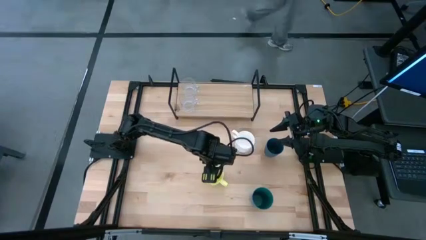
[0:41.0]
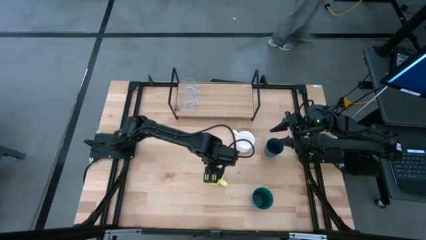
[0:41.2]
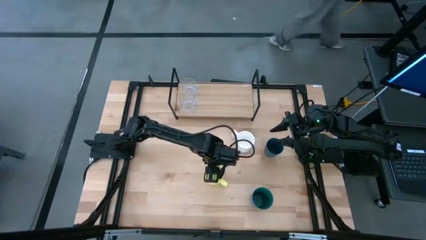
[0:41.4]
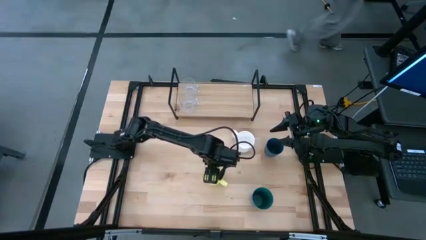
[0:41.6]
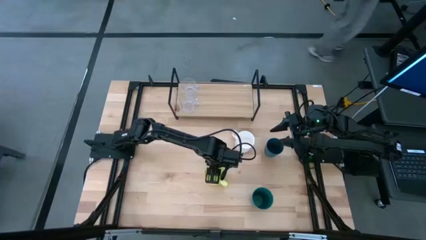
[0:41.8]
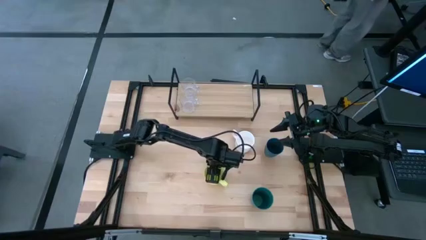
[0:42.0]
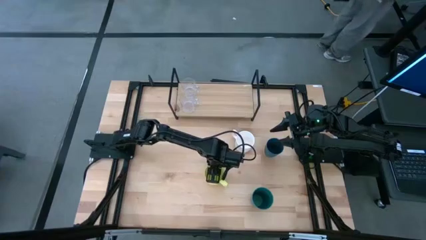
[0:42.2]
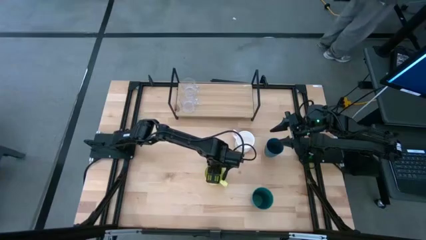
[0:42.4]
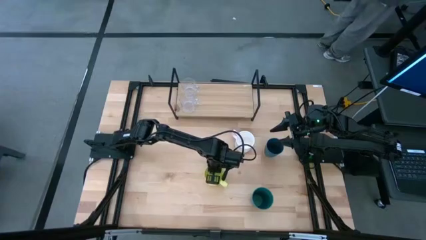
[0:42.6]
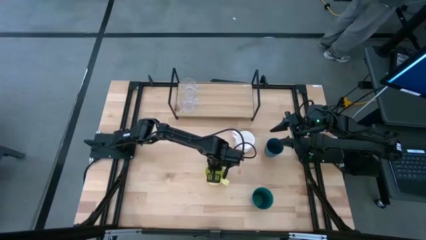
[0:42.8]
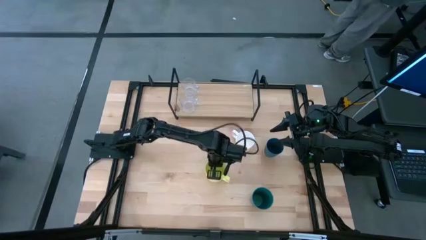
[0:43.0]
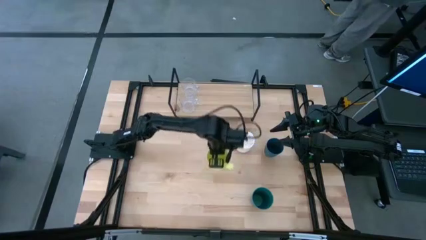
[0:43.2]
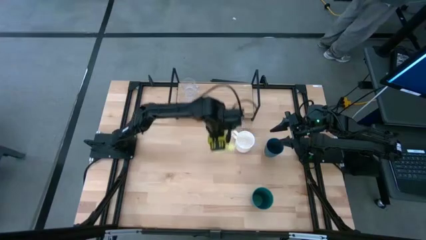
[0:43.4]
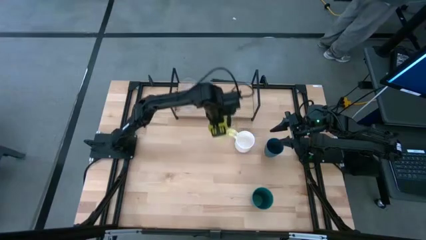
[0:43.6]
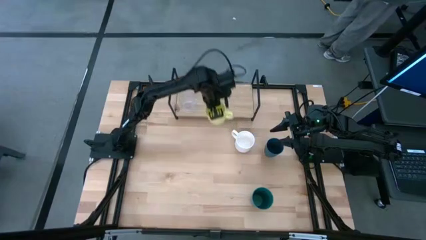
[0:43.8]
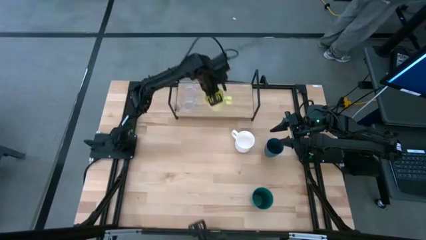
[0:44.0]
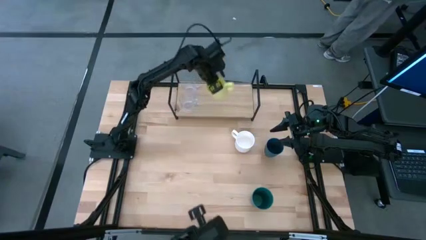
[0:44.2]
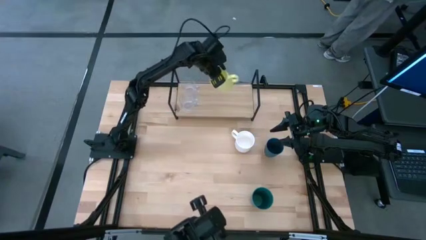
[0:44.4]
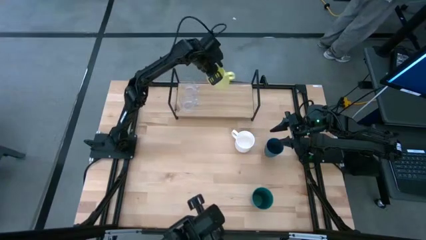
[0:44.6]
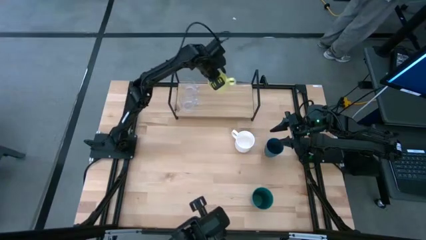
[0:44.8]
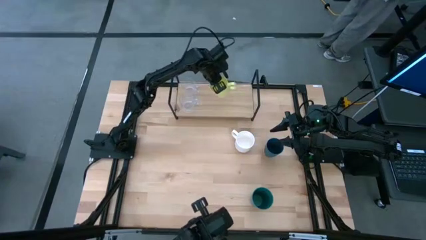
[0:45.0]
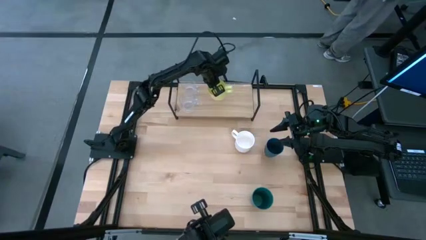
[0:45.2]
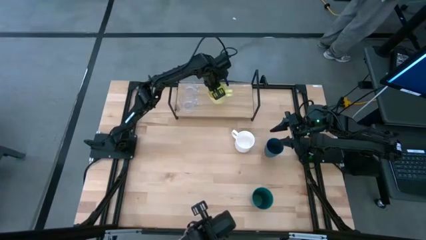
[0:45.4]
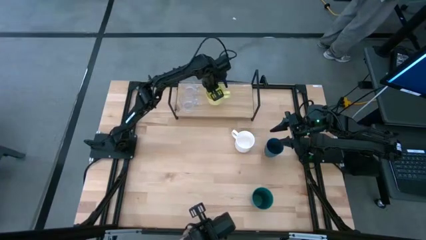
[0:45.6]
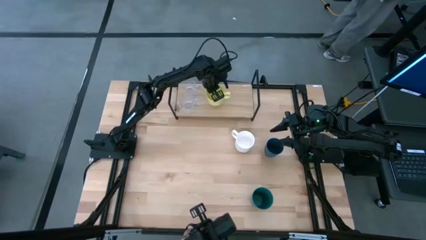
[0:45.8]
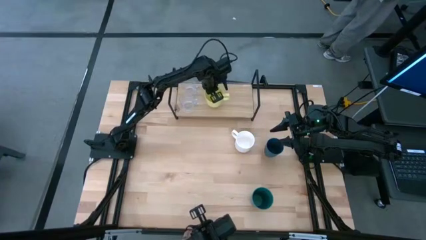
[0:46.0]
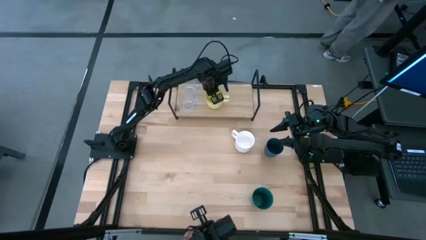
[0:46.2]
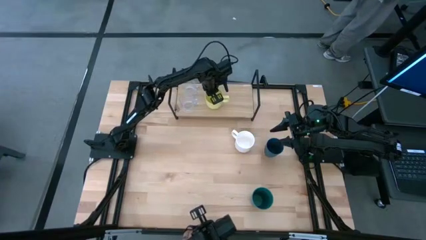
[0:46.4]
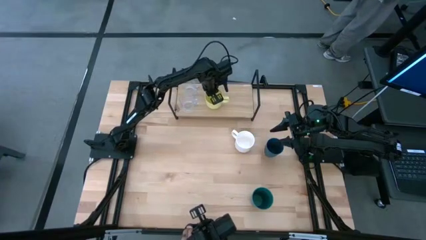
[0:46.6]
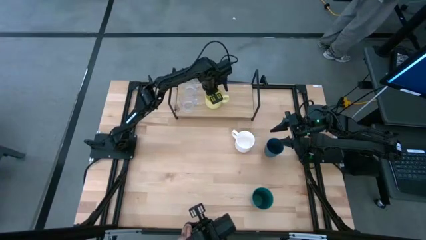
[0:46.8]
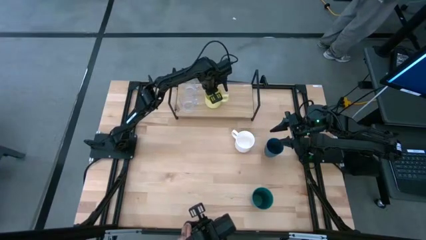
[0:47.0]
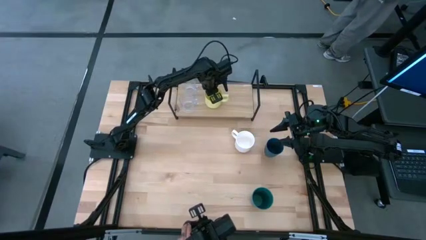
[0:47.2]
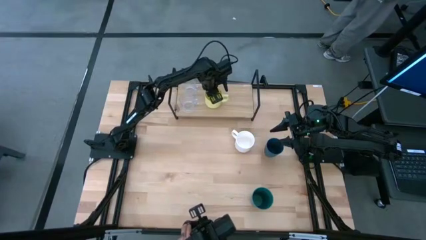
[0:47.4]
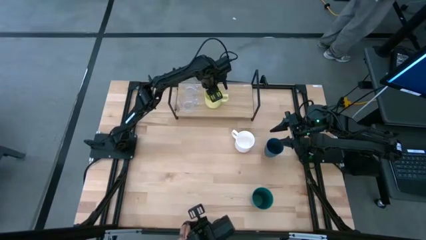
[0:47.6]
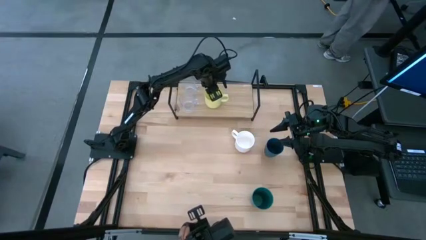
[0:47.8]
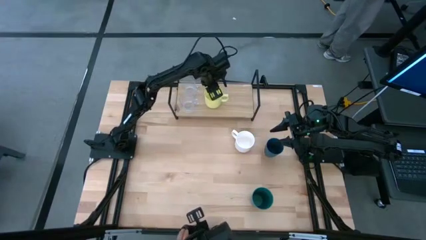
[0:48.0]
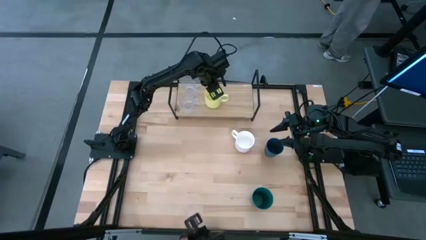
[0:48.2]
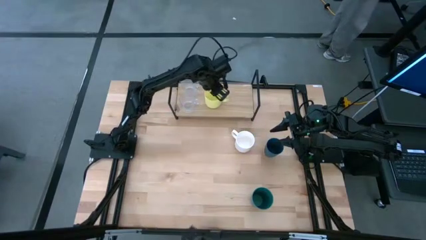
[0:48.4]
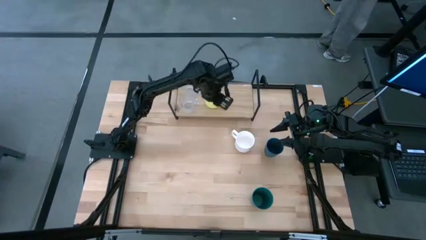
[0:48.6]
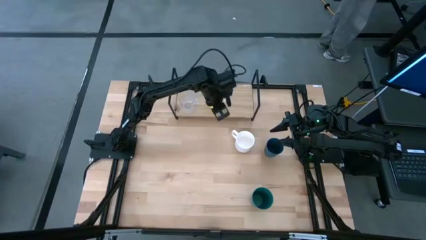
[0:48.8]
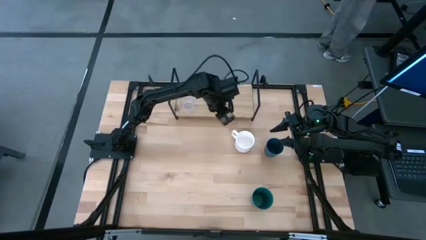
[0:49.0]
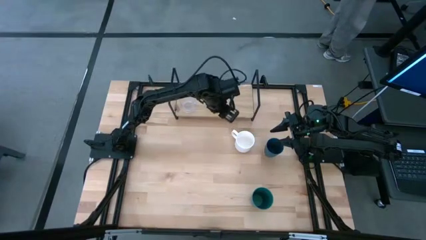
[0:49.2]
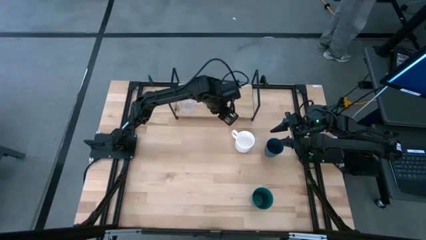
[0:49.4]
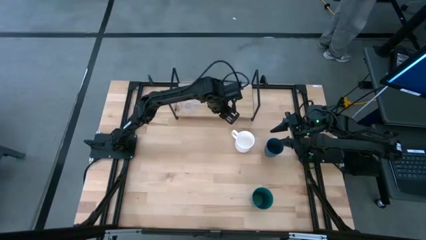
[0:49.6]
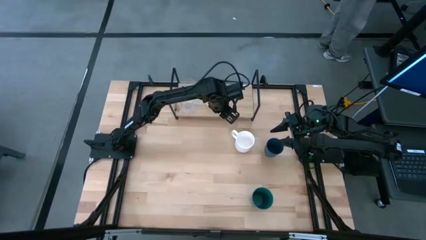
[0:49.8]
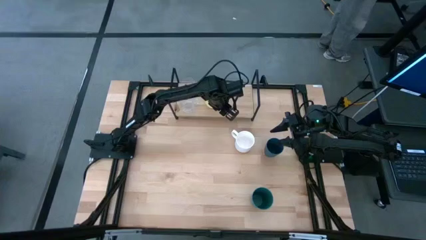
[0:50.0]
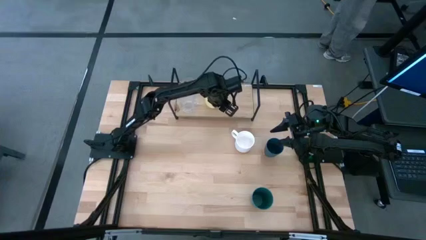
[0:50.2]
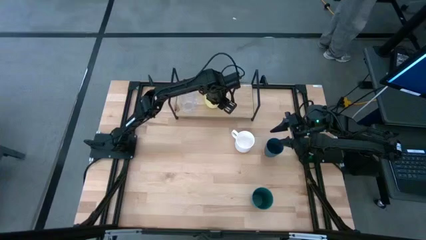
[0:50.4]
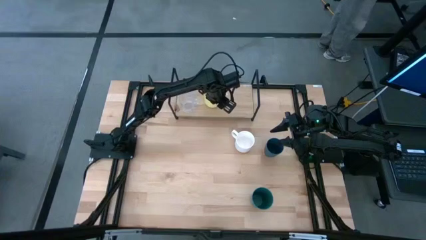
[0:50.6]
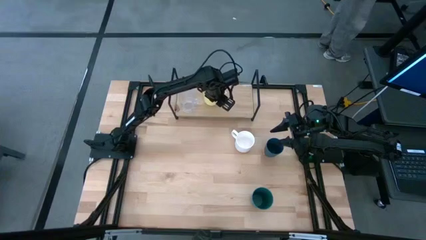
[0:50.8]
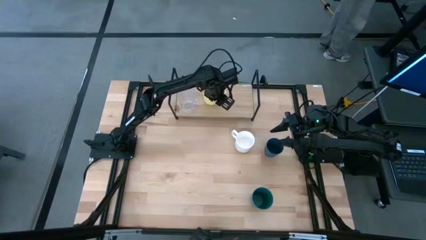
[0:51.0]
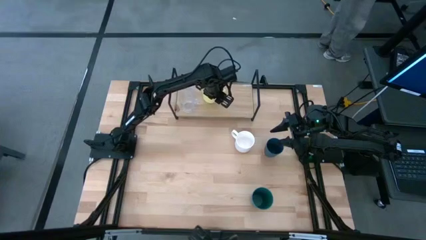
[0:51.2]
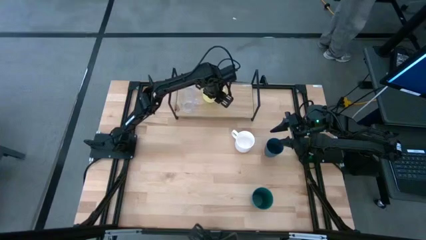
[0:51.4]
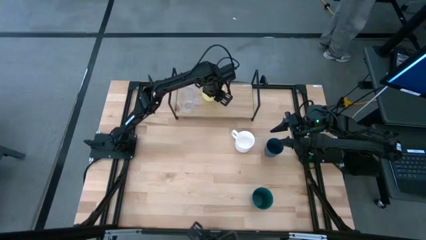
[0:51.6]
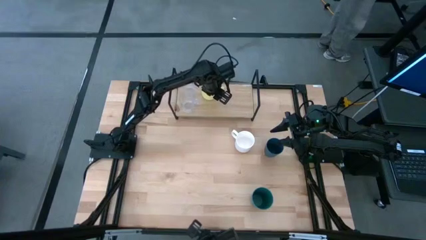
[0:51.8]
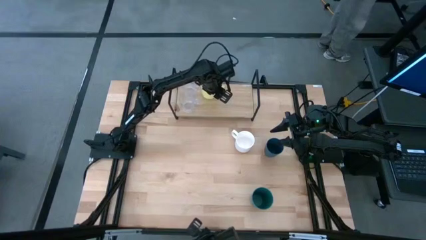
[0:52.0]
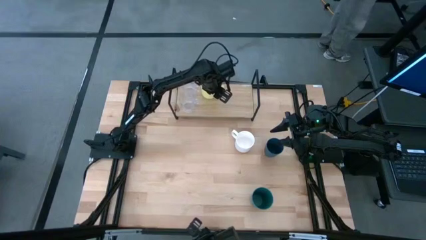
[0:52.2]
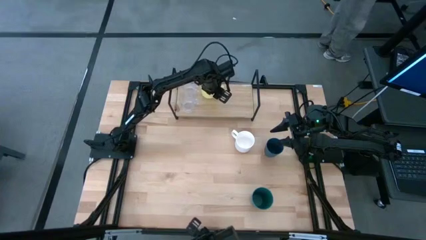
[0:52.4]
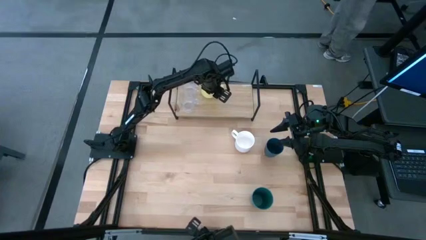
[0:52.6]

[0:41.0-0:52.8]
Task: Stack small to large cups/mugs on shelf
Put the yellow mug on the shelf

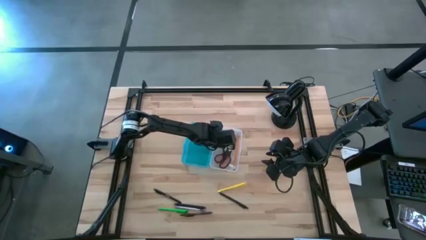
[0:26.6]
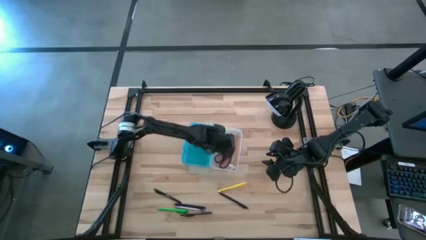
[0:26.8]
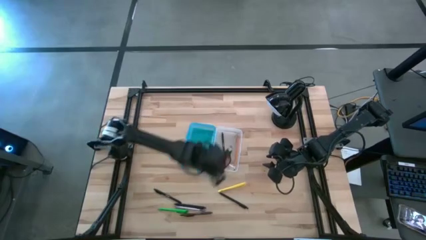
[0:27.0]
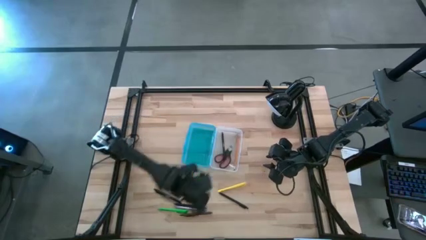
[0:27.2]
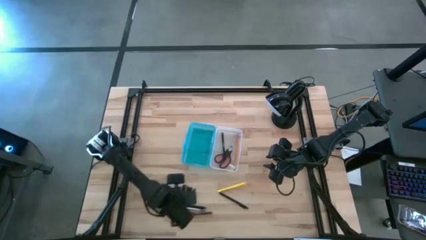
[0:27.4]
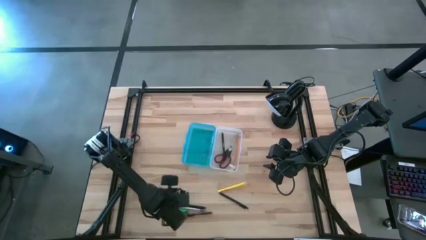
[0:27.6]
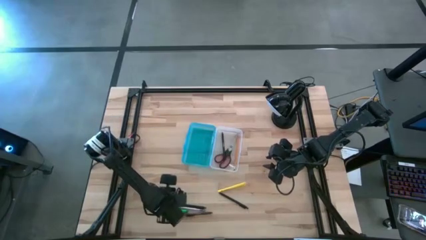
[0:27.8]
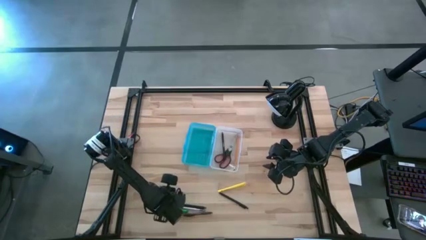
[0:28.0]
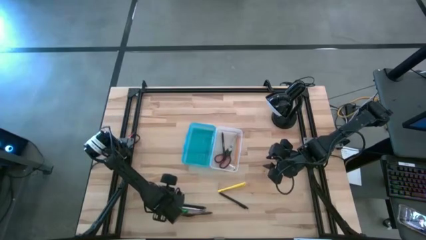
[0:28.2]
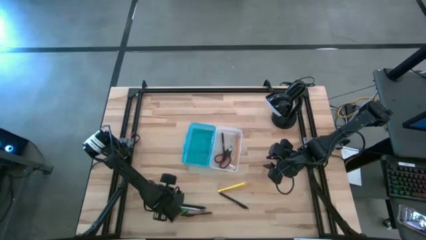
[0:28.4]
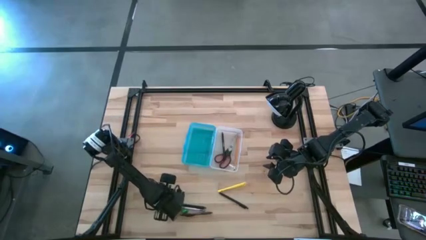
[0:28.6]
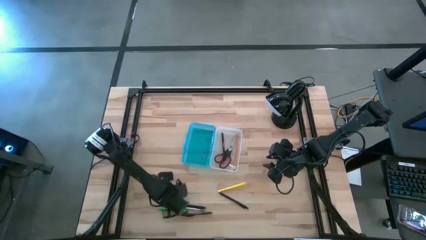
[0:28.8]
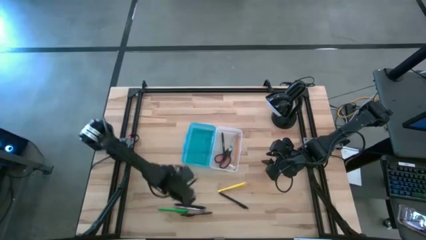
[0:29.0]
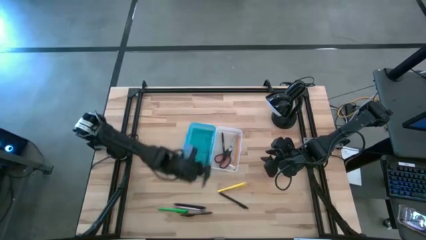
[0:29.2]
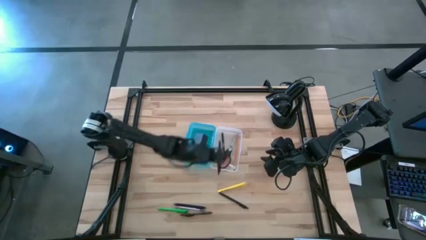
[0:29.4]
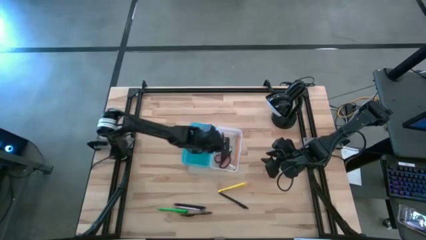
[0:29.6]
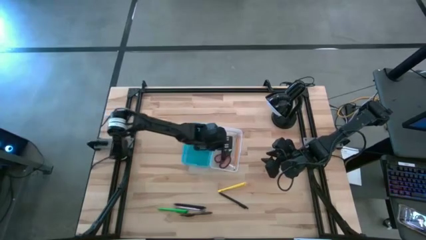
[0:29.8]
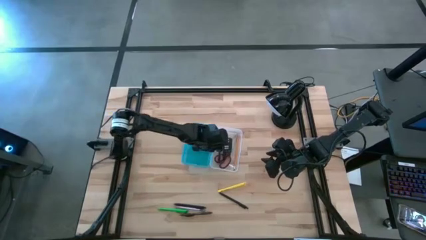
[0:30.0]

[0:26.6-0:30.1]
Task: Pick & place school supplies into a supply box
Put the black pen into the supply box

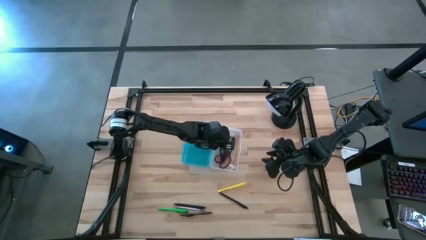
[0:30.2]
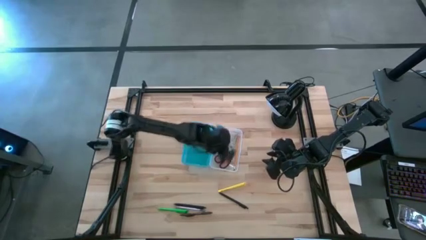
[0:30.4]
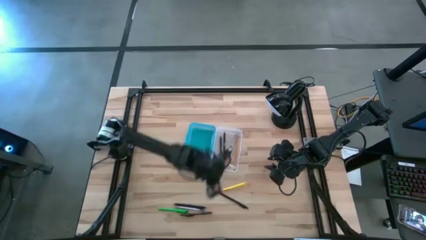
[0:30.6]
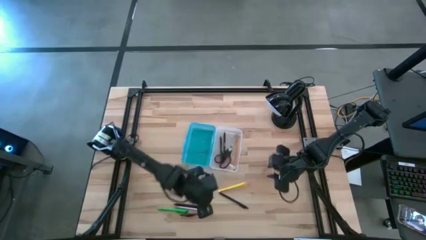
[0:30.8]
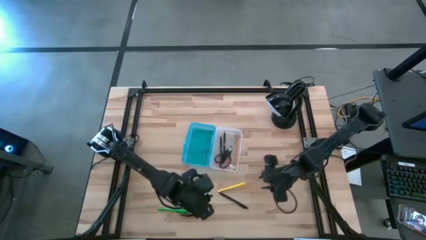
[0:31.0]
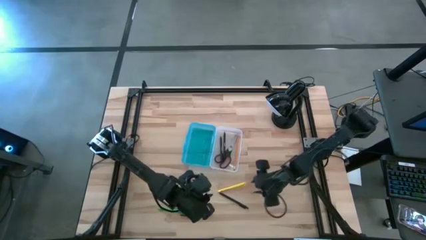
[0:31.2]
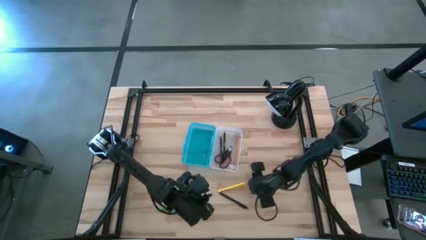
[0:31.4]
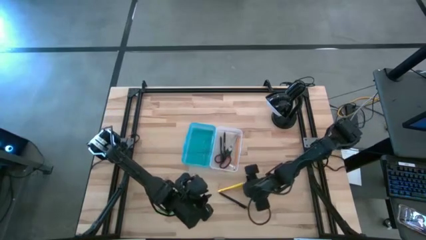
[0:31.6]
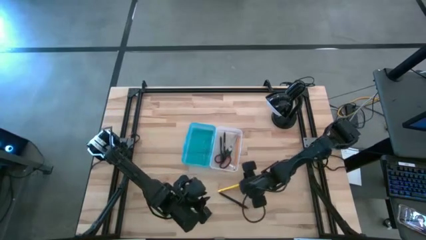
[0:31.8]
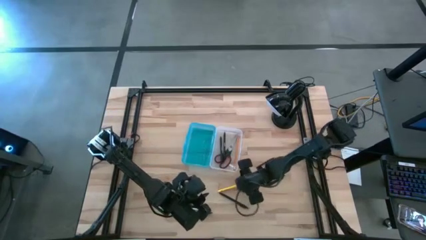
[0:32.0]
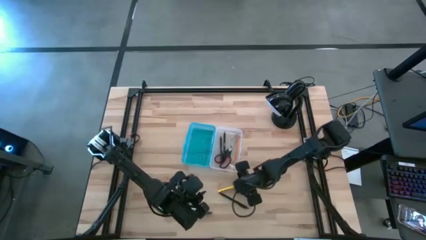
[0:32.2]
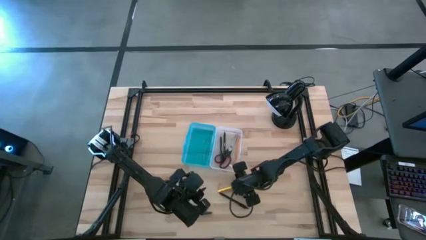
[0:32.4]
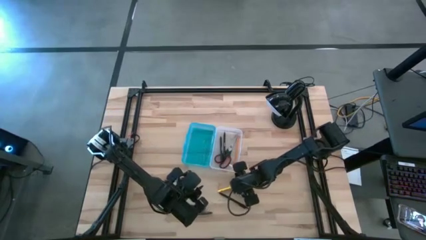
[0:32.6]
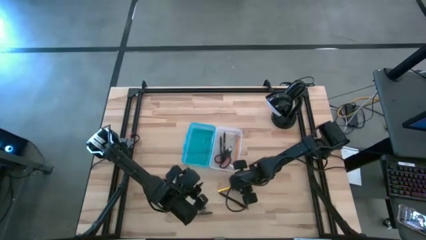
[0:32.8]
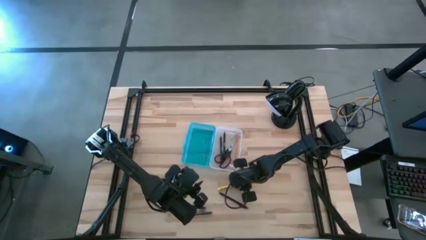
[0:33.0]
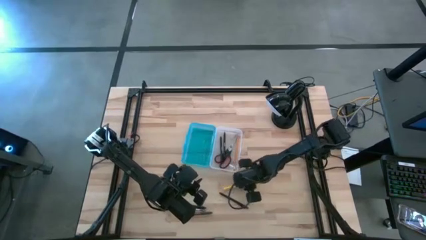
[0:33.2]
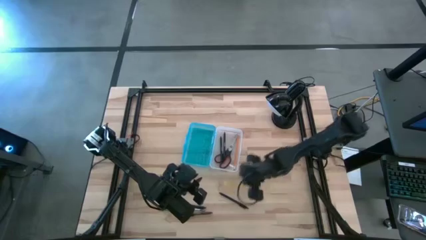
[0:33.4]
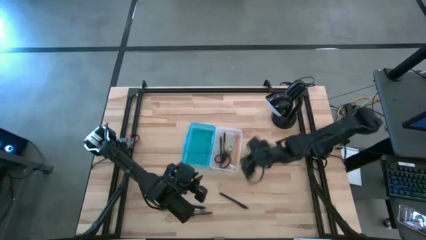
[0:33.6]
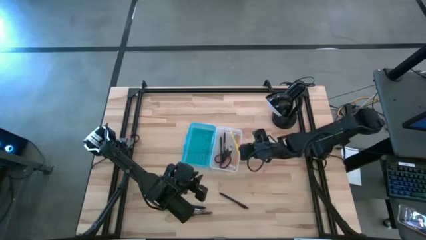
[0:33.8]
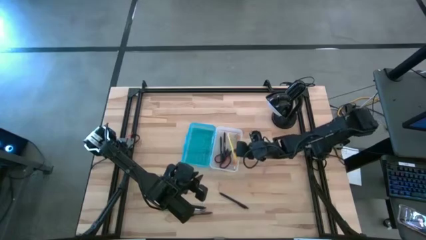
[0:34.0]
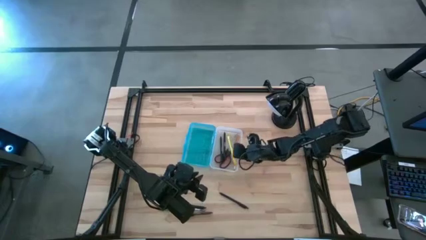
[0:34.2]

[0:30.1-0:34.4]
Put the yellow pen into the supply box
